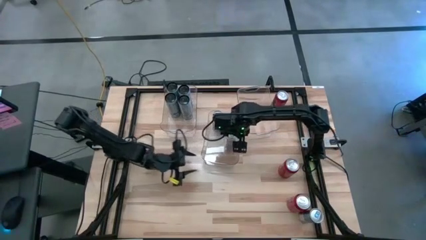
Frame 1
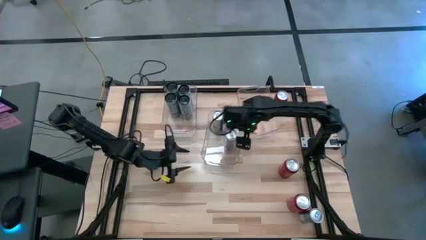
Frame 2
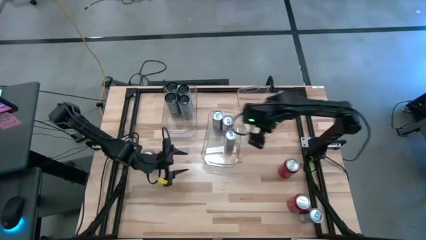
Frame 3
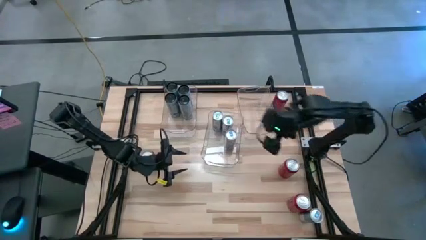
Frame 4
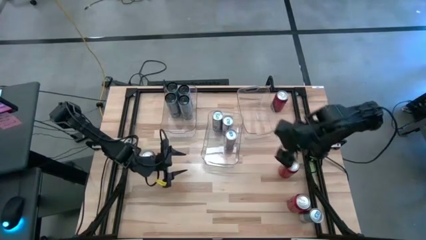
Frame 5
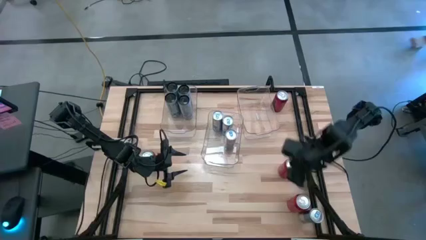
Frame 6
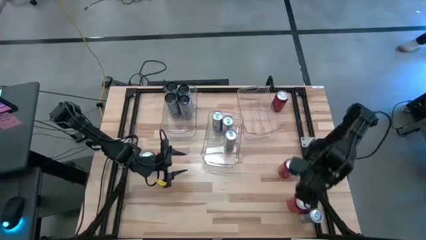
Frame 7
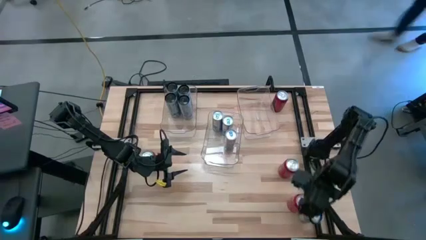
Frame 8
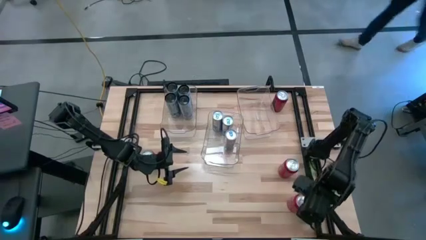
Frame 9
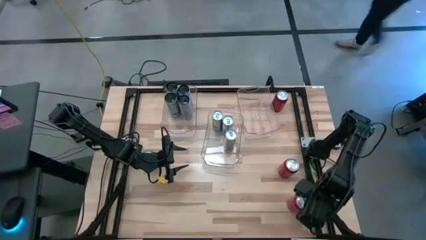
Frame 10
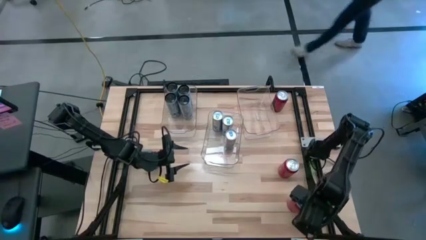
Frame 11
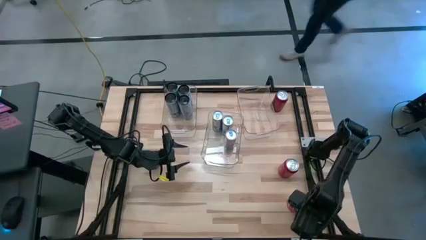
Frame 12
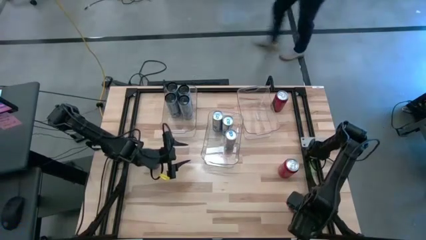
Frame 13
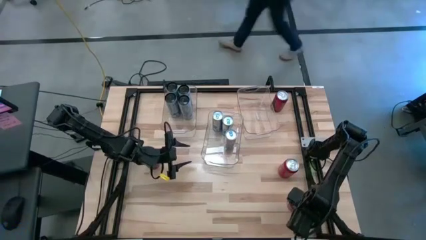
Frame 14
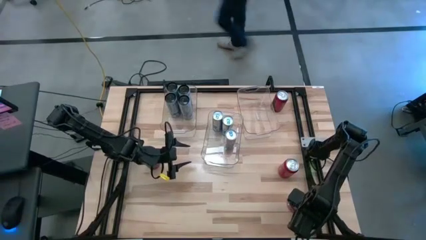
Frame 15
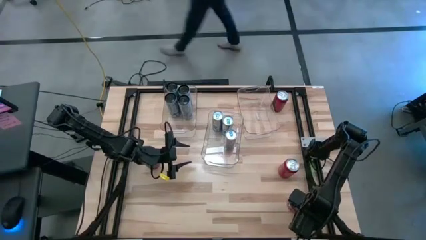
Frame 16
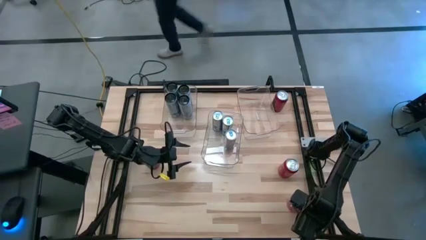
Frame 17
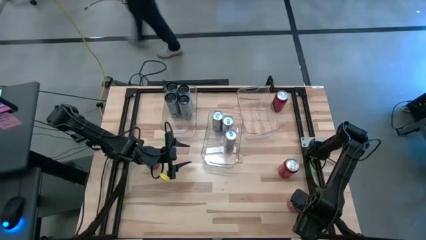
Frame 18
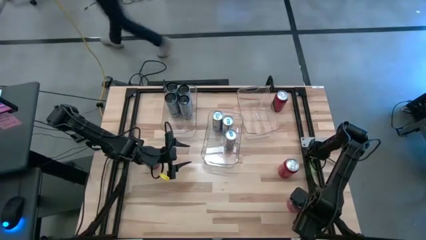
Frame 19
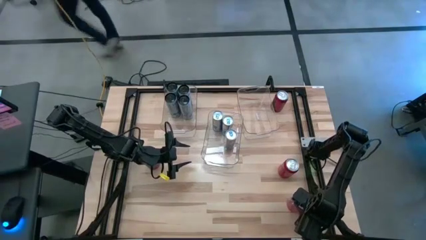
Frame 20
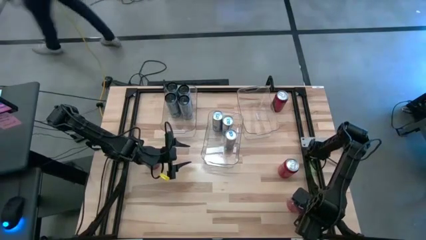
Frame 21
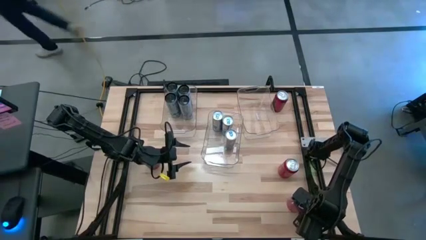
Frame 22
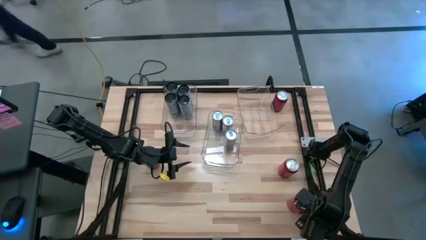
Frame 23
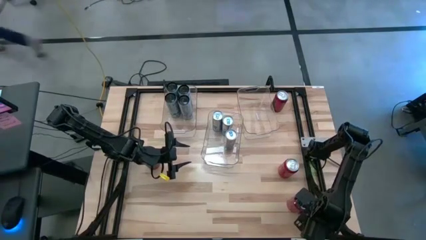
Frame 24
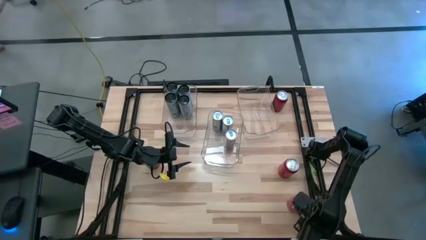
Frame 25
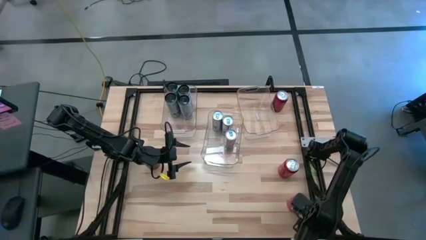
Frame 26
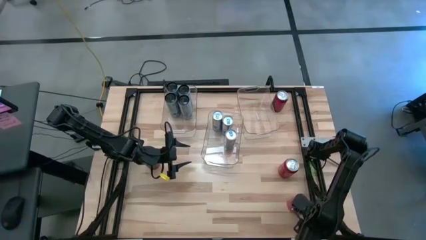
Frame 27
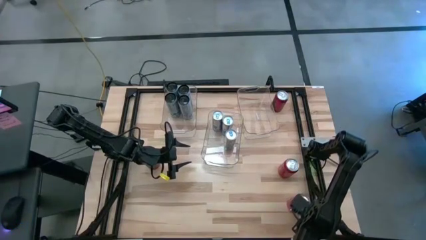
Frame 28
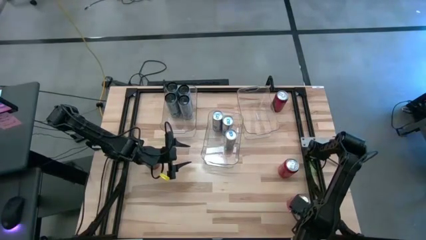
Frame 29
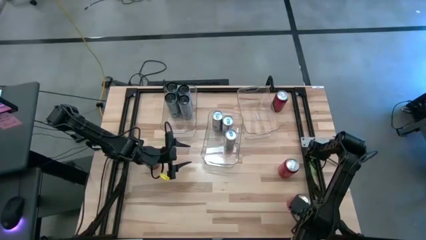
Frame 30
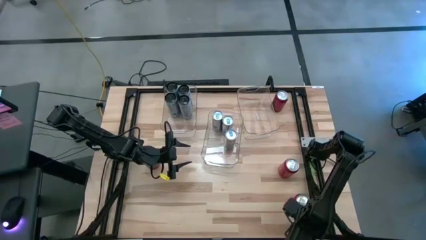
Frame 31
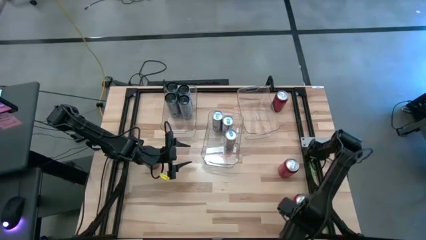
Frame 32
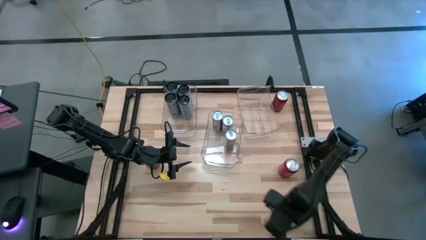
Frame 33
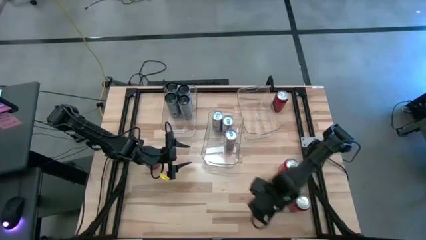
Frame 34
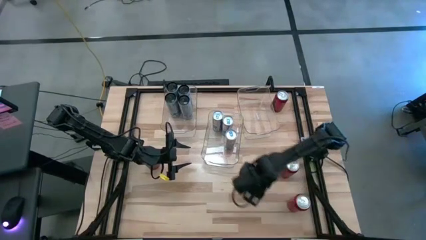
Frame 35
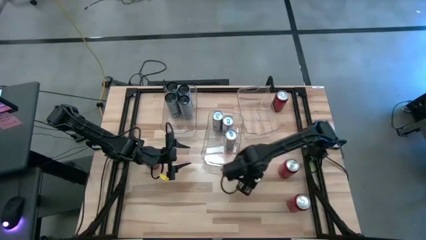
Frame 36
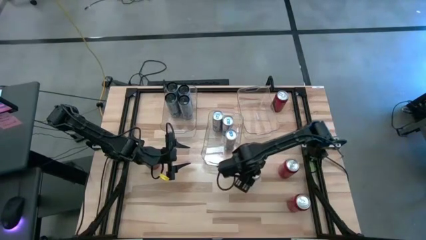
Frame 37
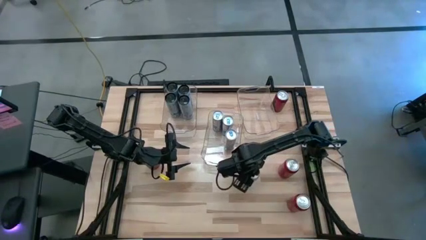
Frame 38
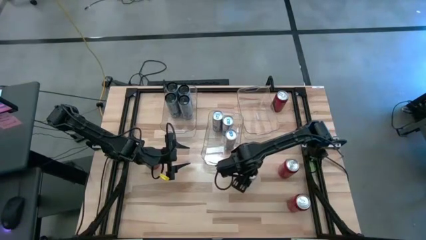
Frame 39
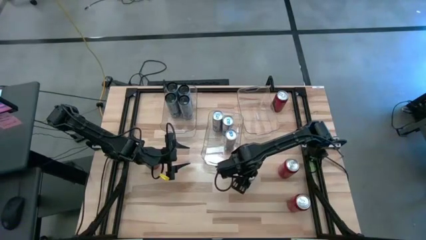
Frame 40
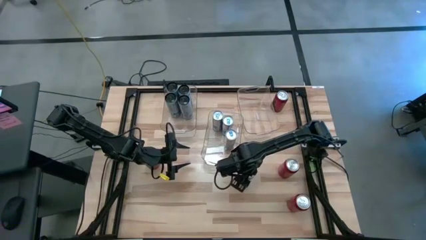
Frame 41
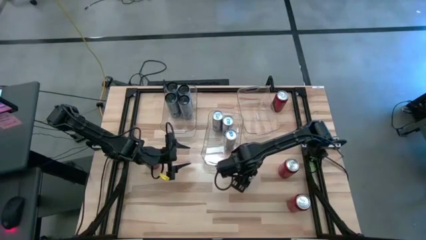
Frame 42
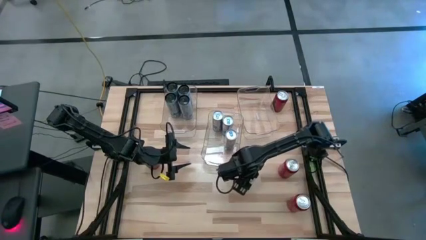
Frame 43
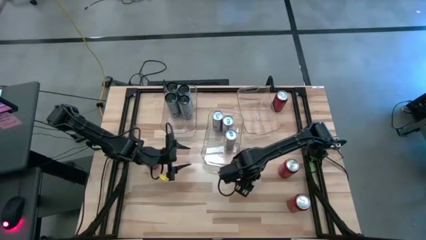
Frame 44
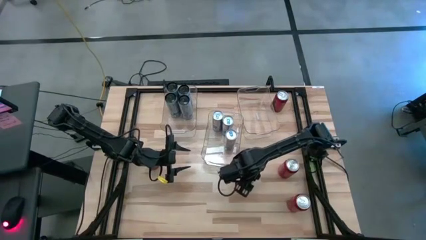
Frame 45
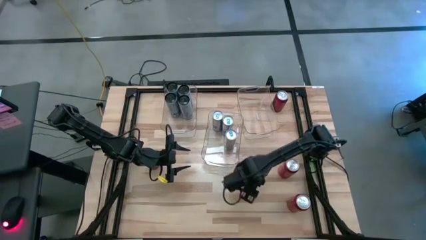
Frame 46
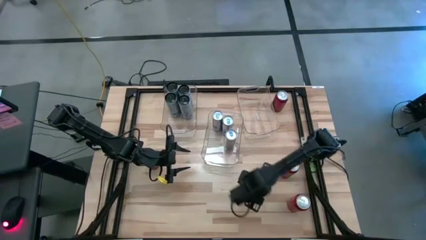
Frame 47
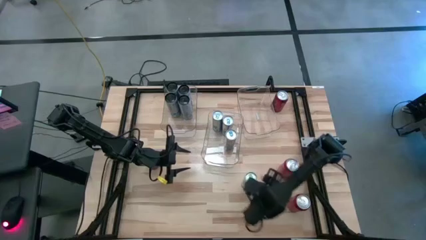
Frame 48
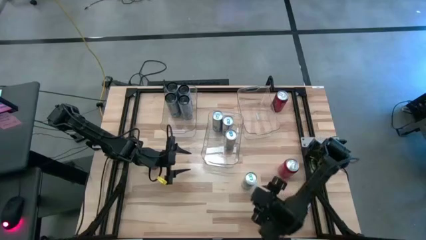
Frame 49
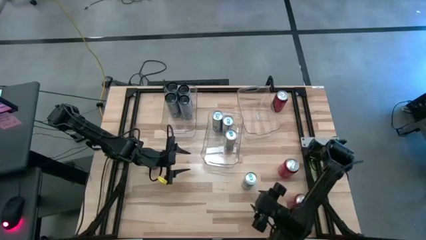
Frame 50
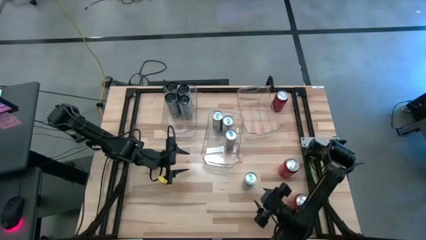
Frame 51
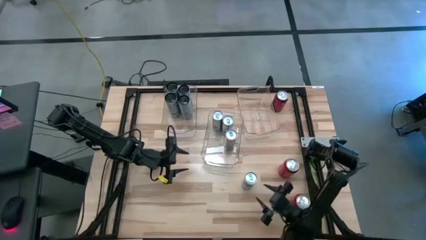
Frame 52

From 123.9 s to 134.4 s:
Task: Sort soda cans
Put the blue soda can into the middle transparent bin

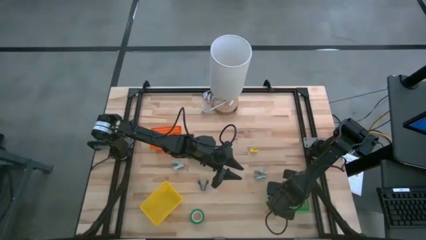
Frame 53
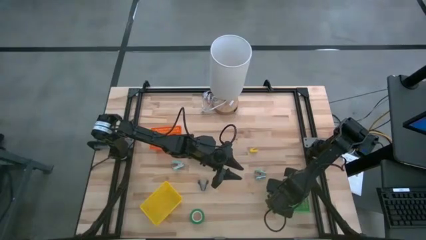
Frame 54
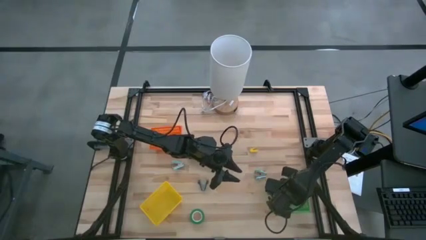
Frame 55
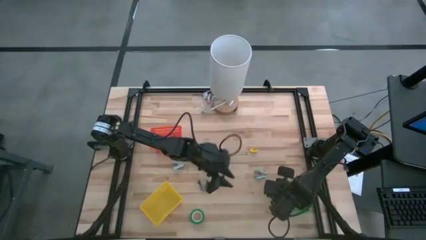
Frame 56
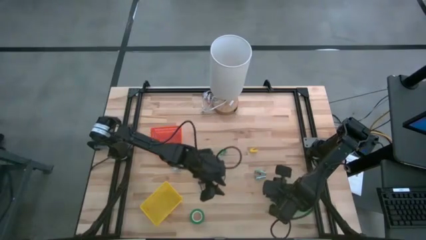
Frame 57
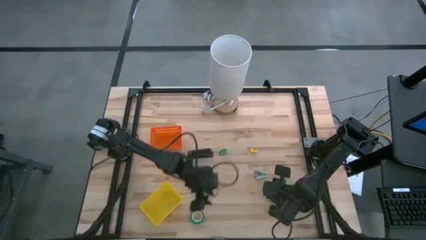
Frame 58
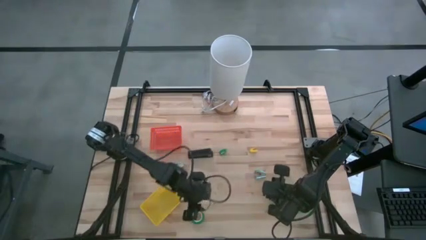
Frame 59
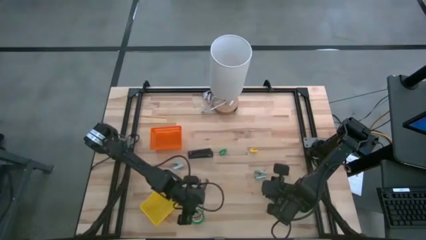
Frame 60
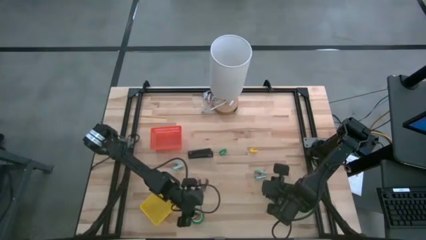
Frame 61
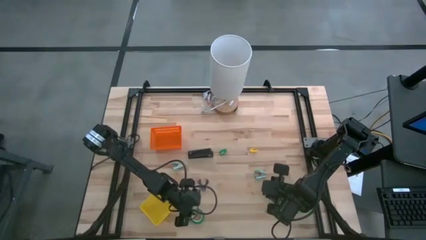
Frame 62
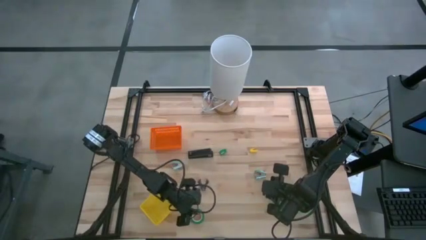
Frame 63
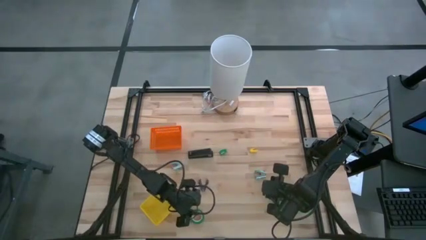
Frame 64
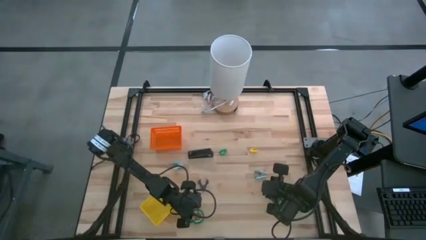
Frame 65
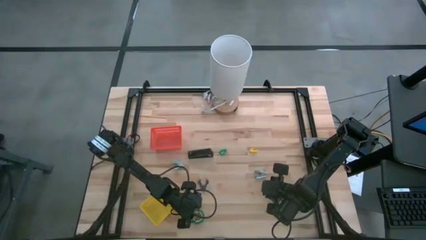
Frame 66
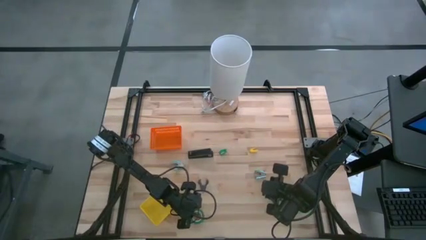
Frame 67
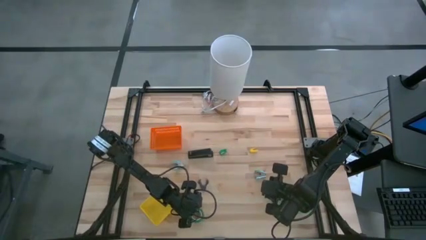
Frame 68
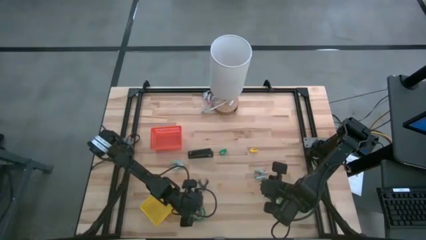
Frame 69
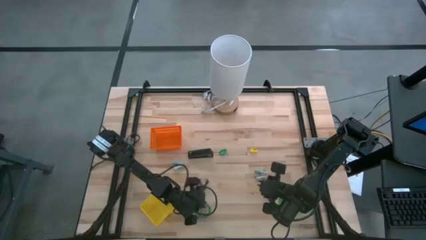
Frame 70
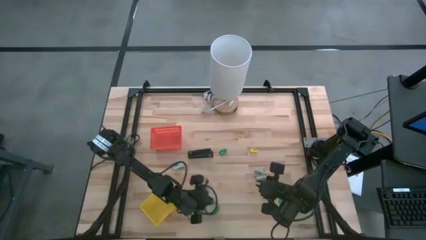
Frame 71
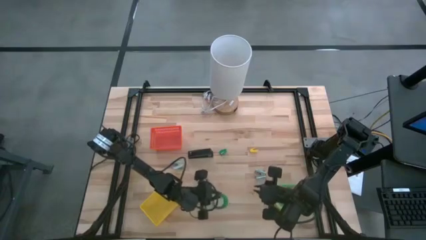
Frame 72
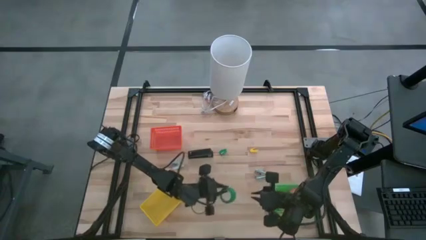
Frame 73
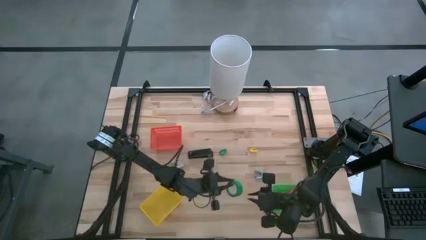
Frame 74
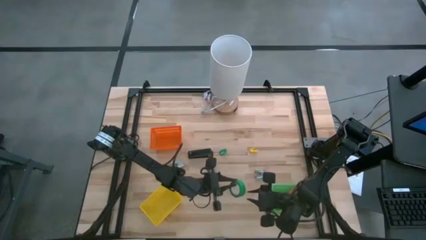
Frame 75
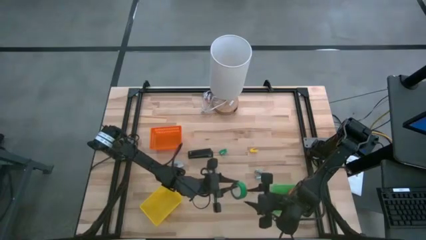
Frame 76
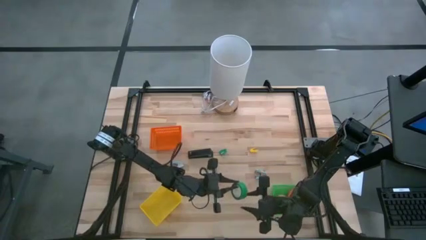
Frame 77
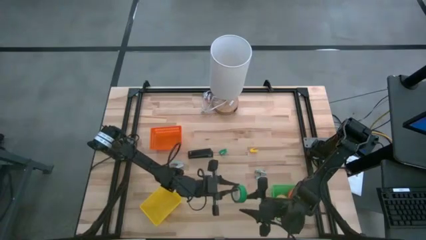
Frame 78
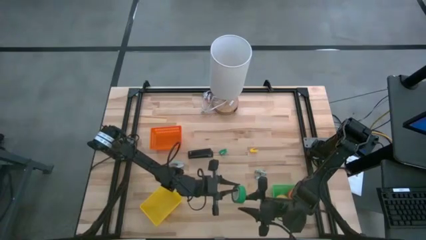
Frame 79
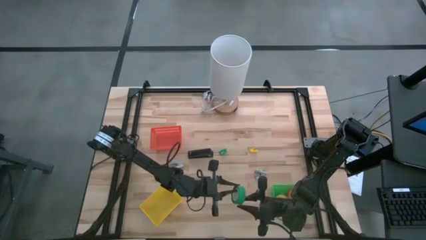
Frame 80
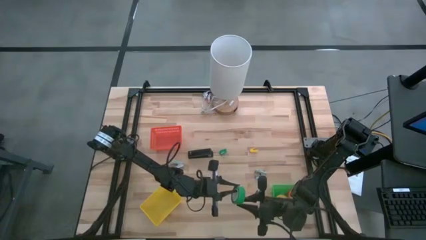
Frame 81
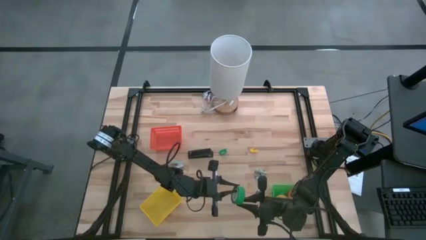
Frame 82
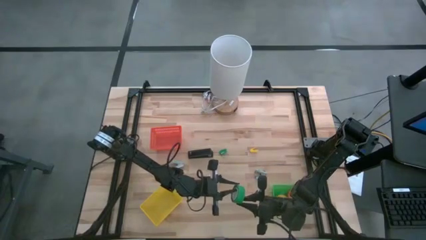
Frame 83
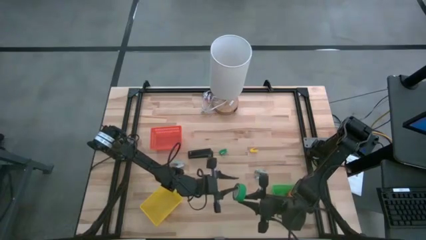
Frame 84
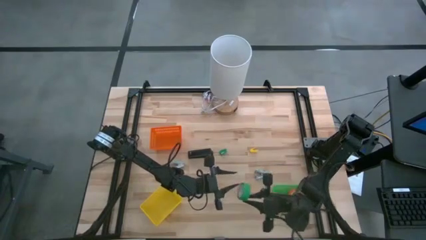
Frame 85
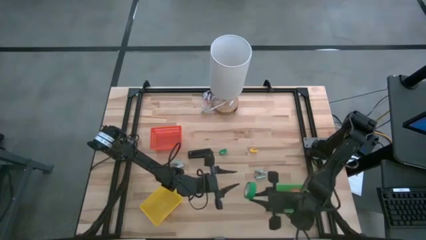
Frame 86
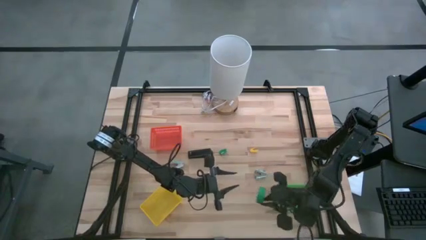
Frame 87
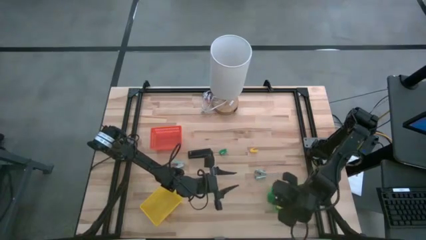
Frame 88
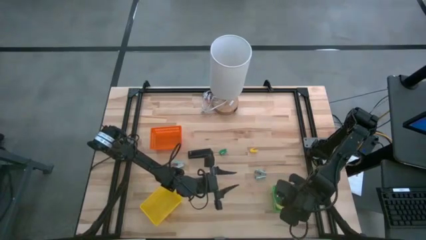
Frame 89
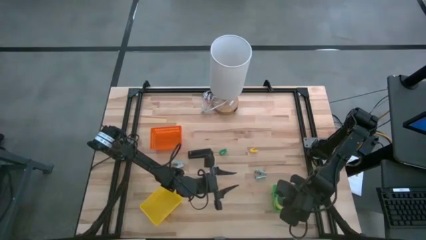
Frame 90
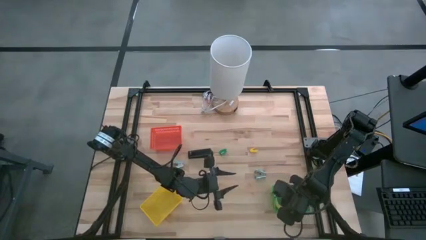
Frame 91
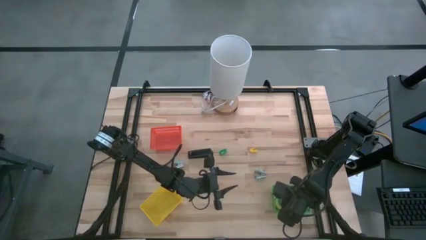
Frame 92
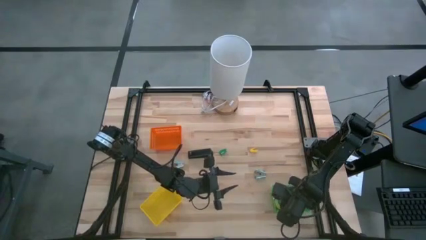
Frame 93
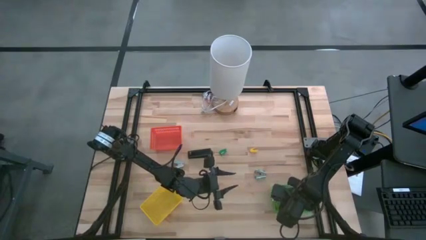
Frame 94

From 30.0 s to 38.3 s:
Task: Pick and place Stapler, Stapler remover, tape
Put the green tape into the green bin
